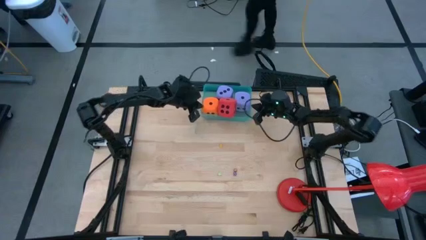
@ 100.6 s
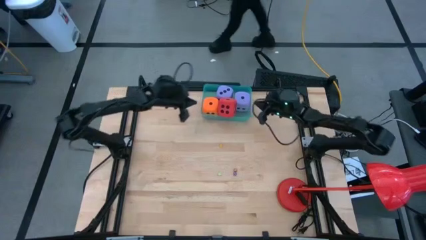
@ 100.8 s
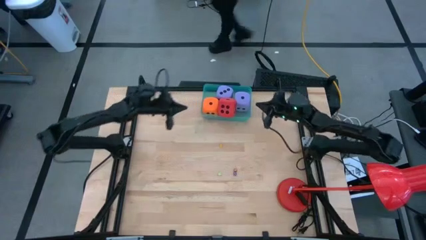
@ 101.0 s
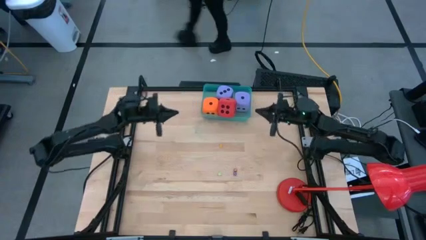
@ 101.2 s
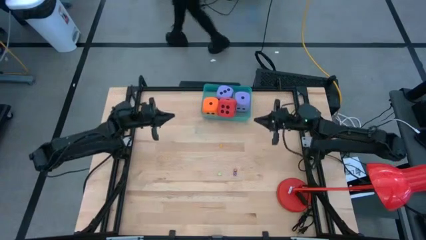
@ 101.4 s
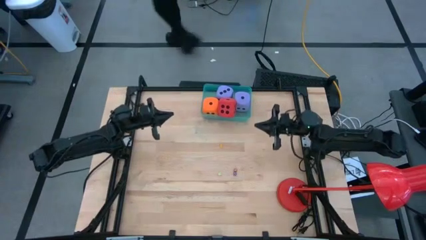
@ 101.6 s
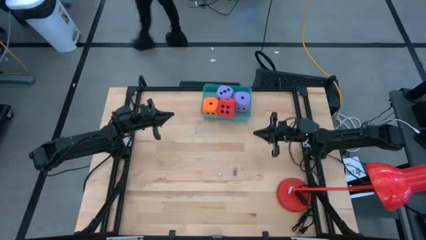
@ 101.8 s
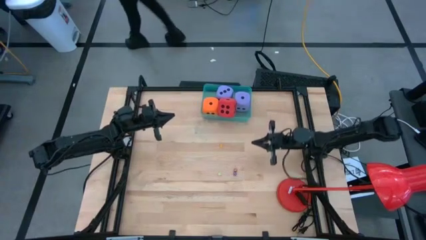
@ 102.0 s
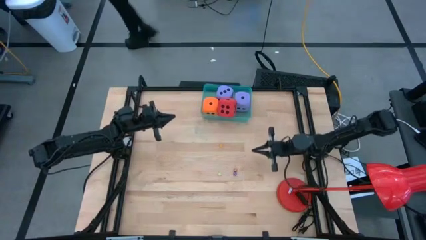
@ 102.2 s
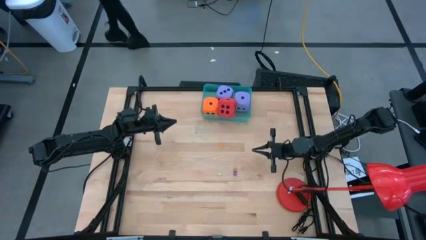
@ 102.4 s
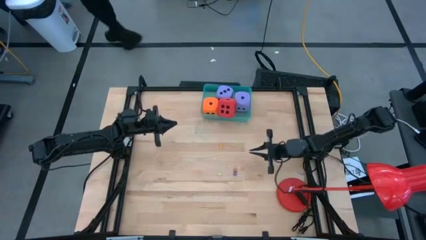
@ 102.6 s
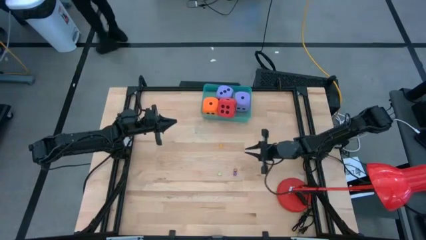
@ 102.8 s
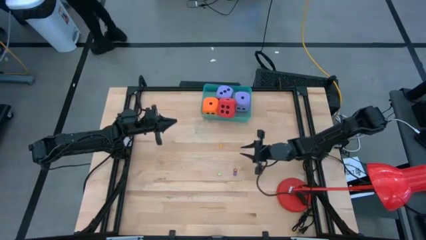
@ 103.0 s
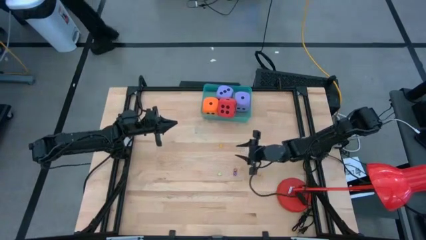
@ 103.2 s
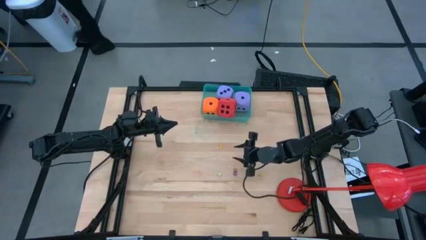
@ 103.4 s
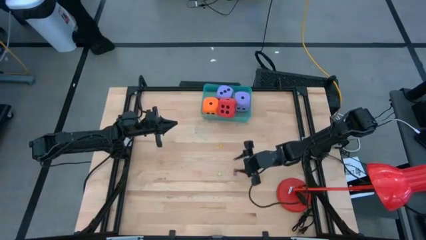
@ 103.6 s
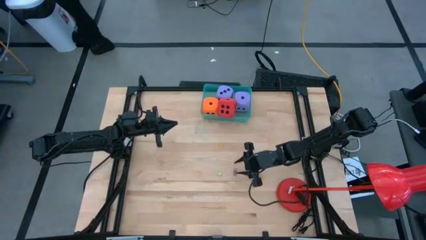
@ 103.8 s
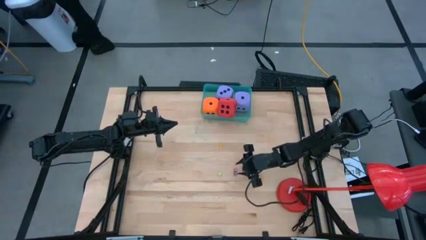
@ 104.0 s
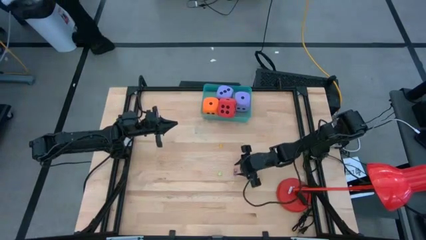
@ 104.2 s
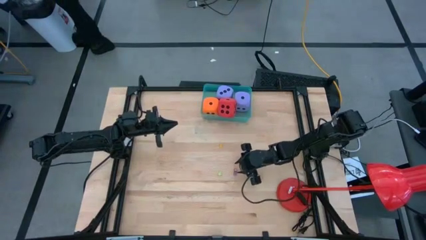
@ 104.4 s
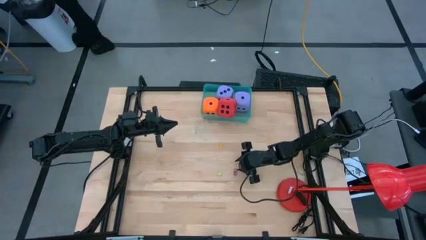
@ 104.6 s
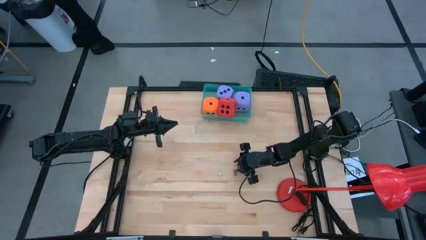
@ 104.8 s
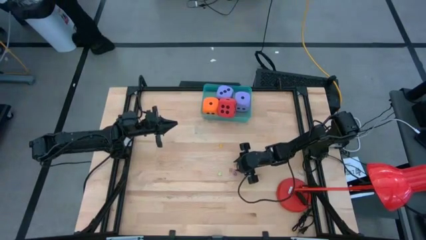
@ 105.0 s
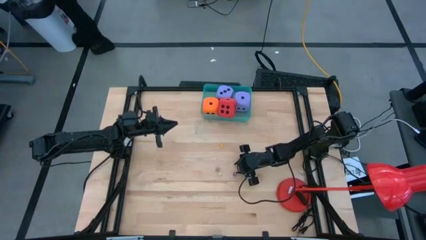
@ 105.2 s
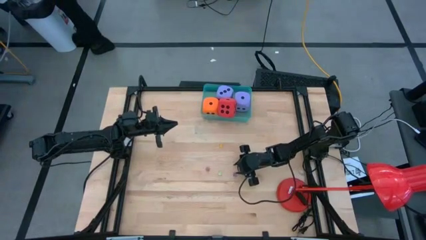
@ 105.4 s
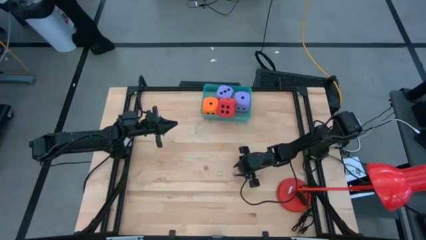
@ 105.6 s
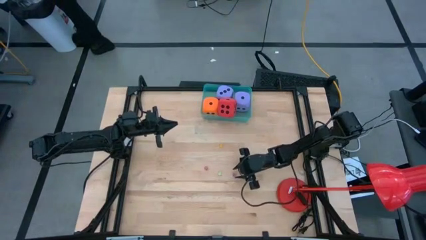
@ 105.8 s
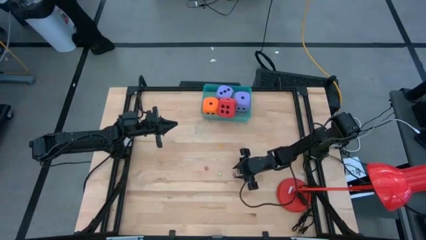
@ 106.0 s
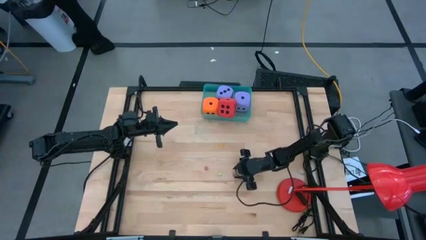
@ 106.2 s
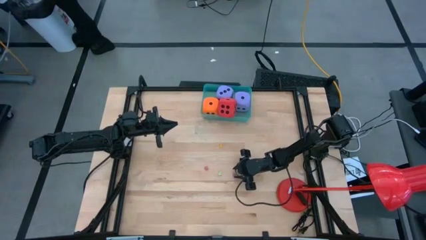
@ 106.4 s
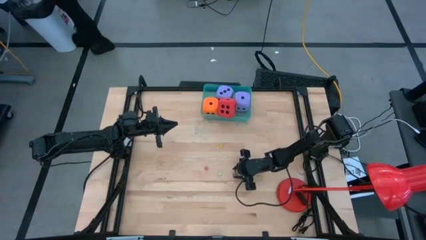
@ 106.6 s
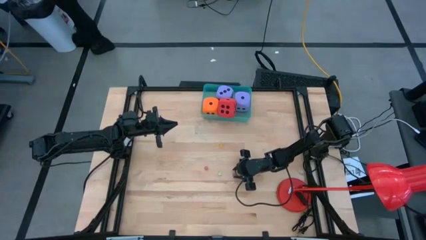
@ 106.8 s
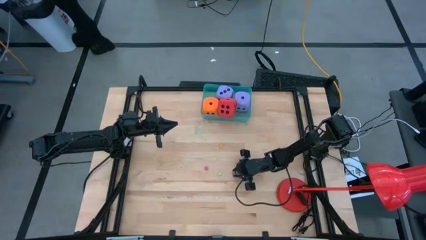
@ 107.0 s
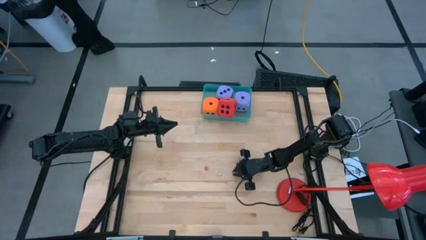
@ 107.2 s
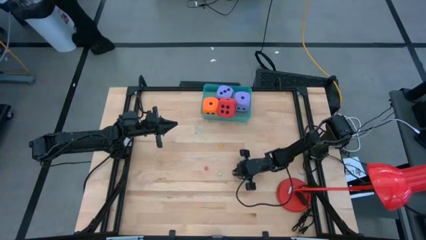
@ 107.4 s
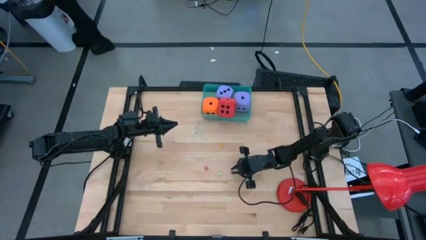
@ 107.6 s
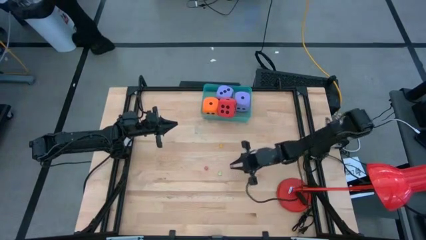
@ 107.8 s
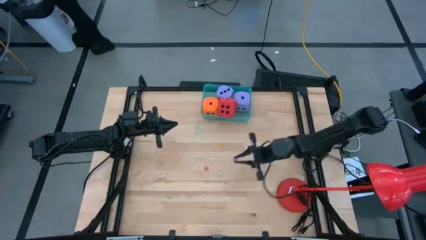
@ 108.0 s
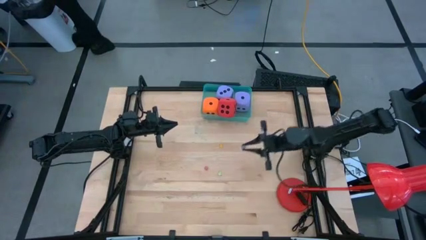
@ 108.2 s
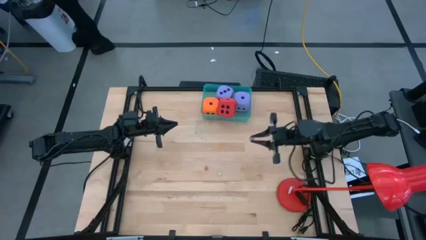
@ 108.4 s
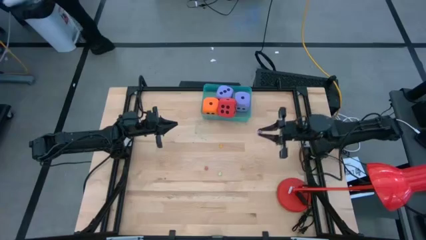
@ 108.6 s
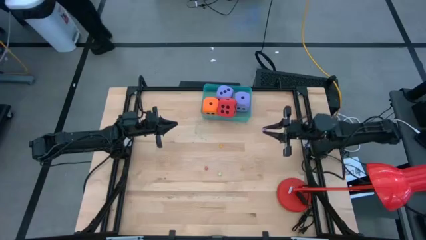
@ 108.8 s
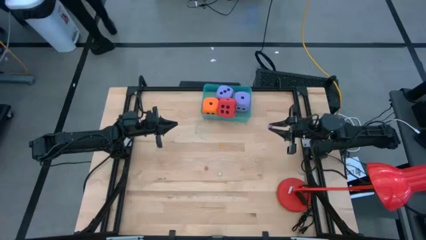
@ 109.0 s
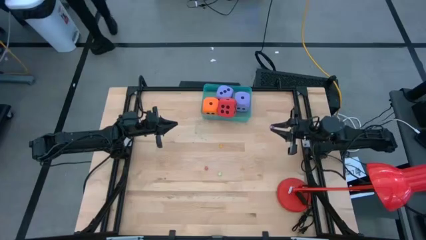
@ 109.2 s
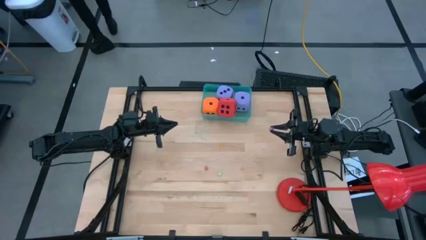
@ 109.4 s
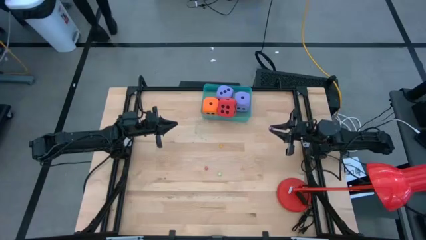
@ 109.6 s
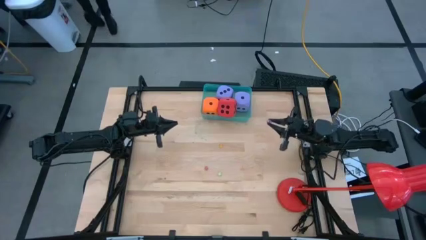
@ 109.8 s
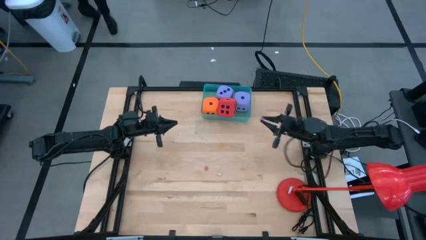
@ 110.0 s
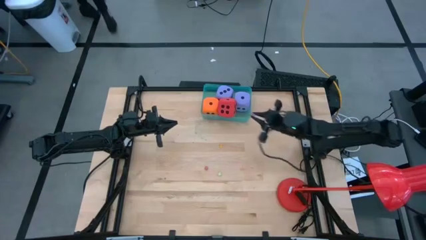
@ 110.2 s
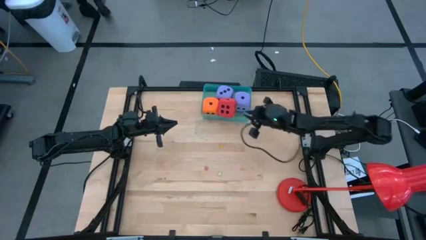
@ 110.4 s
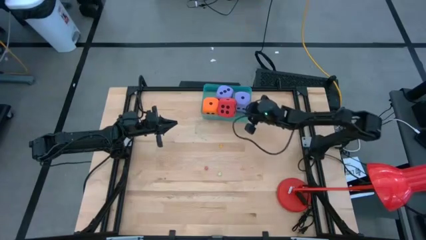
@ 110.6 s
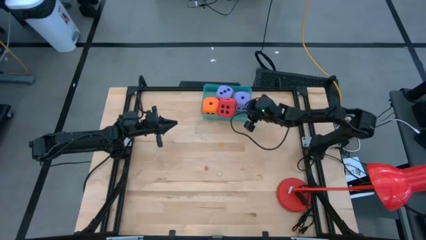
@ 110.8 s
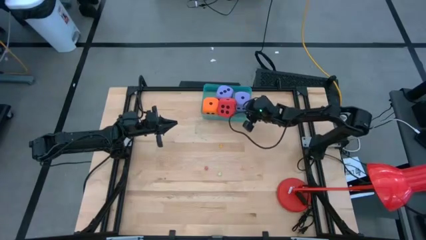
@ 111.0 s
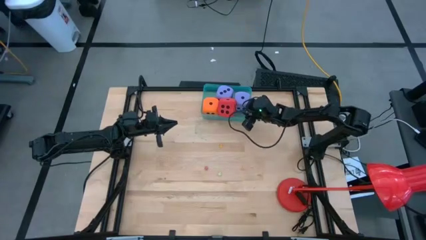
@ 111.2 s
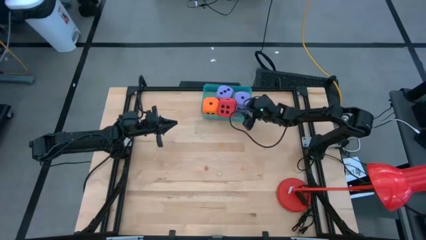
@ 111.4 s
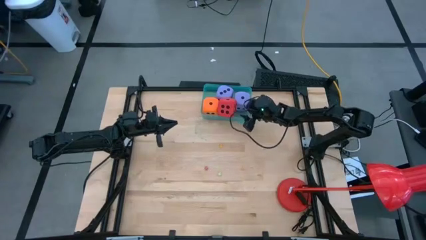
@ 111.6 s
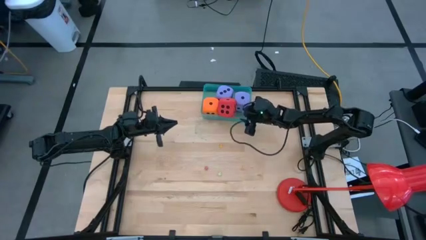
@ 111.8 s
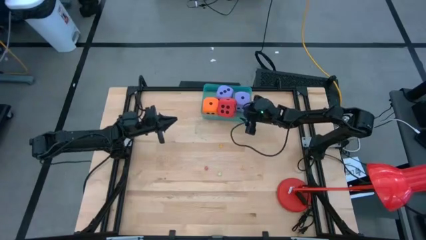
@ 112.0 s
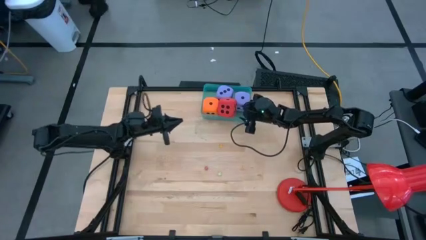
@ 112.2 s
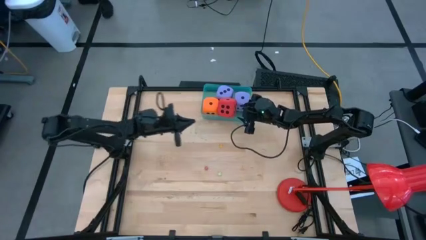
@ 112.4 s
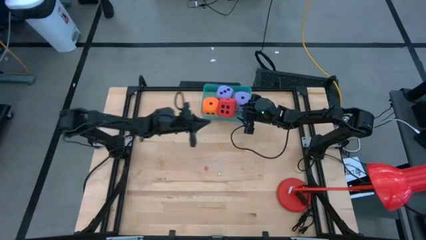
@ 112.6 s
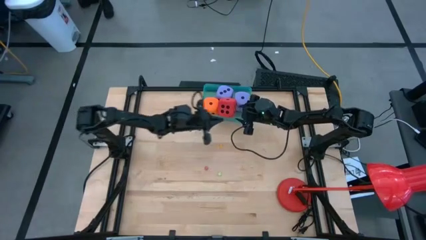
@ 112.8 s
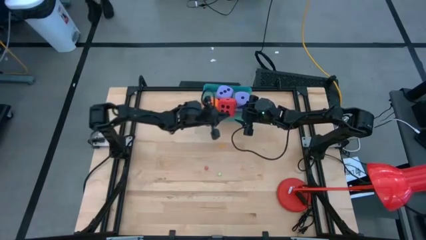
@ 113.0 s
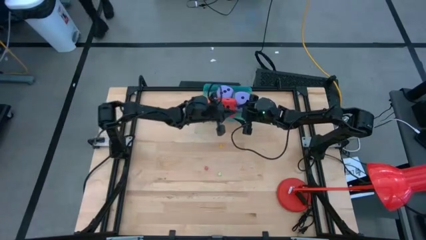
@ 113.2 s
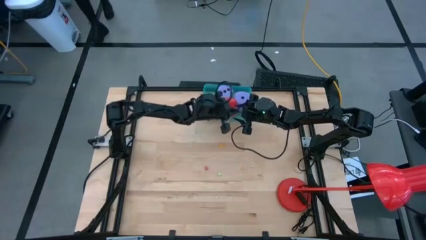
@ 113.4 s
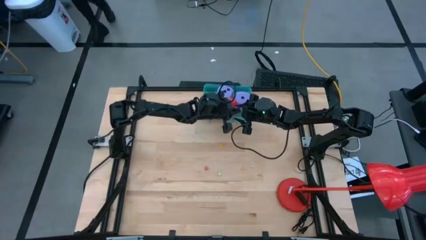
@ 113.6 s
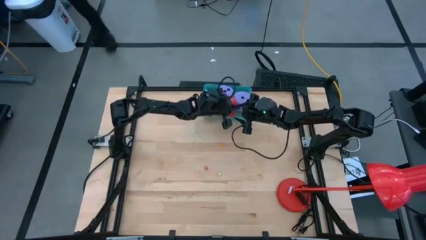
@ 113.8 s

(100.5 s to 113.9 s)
Task: Pick & Place Dice
Put the small purple dice into the blue transparent bin

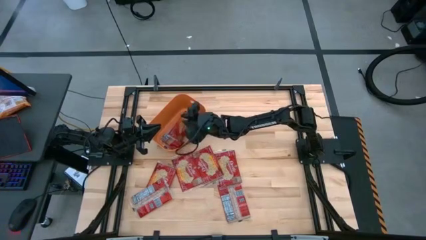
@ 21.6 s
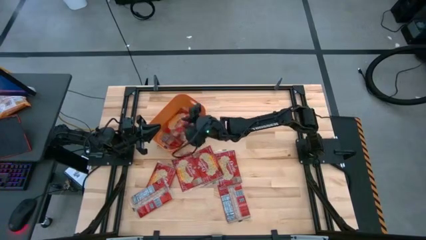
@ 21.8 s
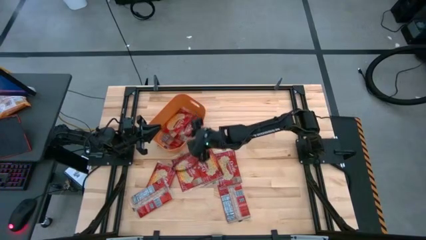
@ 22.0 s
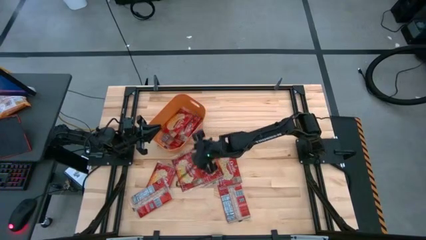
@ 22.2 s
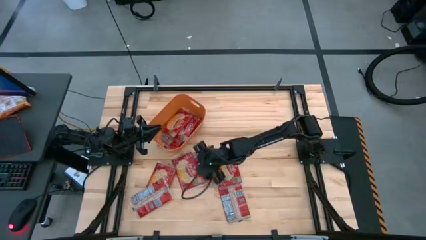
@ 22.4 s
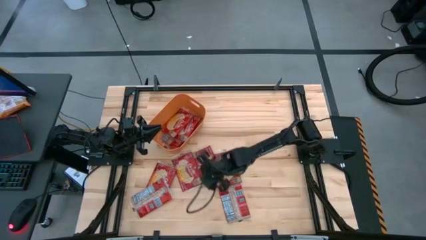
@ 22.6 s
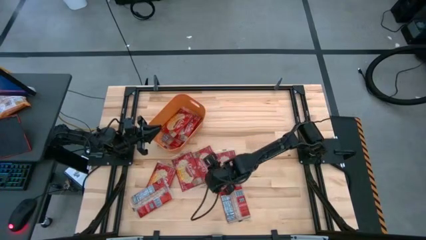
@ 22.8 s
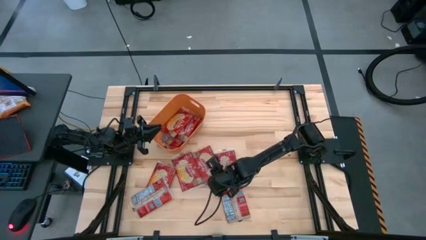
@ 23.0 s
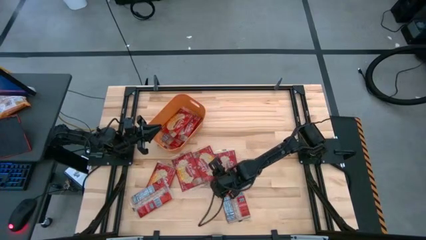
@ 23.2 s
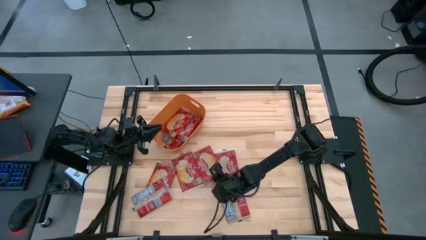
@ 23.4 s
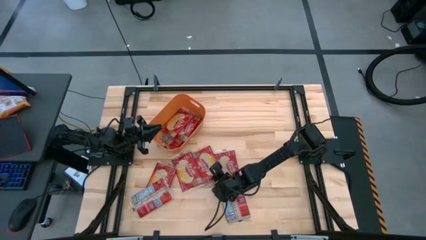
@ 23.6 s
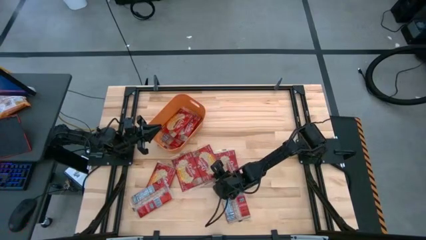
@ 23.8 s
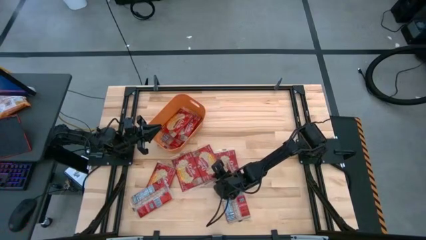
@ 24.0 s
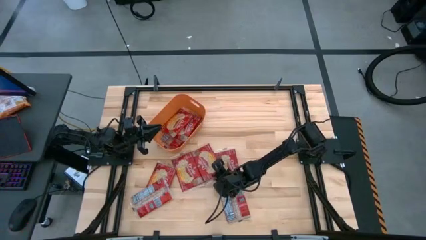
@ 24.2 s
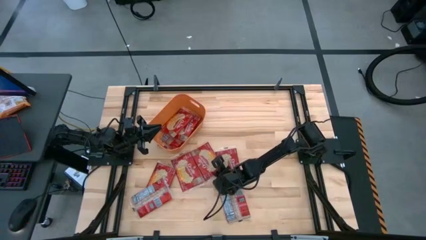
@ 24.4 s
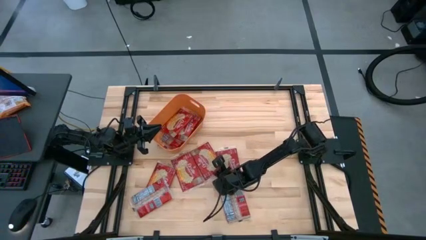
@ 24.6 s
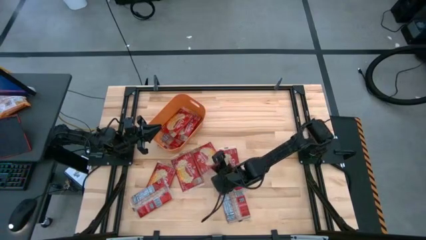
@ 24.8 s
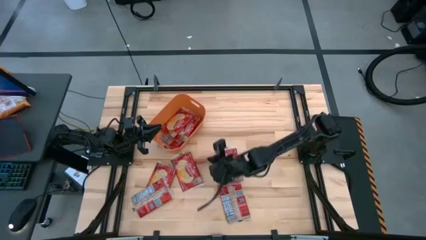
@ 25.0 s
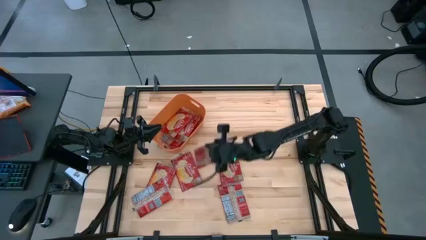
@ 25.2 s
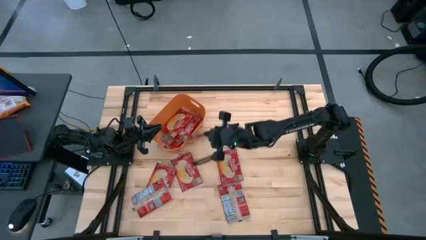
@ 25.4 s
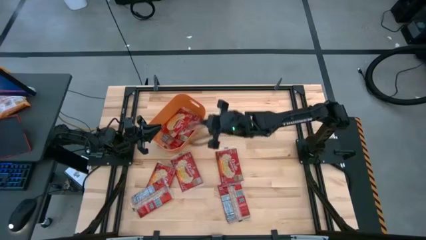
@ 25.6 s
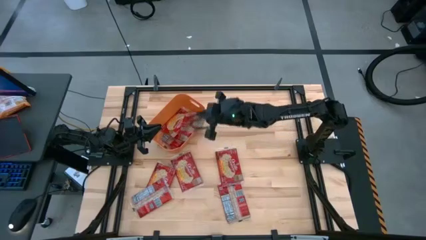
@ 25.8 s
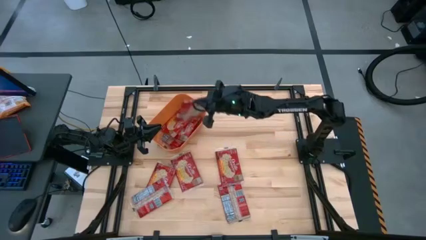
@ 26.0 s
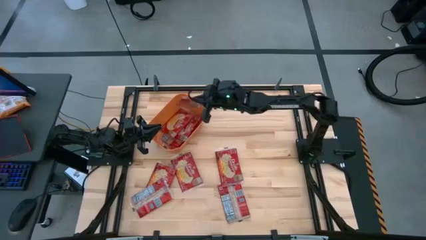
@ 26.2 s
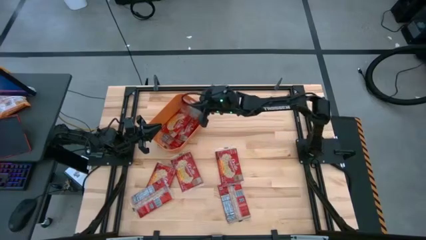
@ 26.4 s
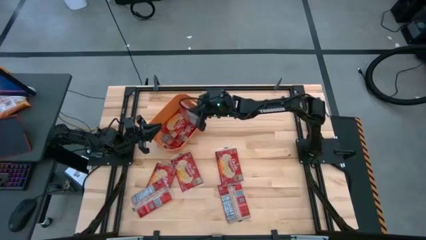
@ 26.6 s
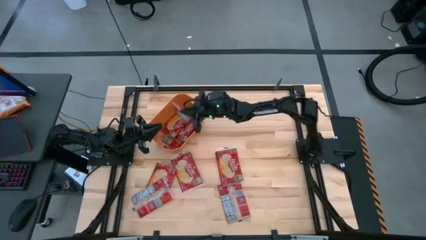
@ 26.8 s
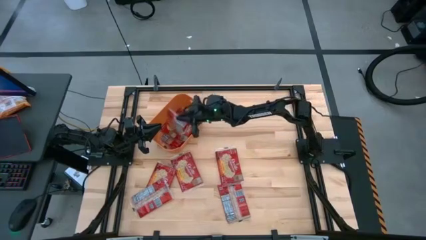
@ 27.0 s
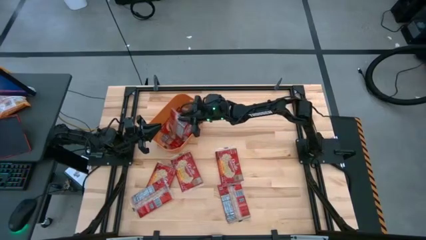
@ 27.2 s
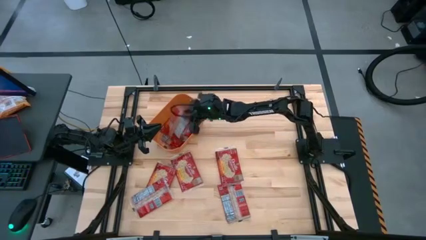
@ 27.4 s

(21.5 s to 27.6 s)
Task: Sort popcorn bags into baskets
Put the red popcorn bag into the orange bin
